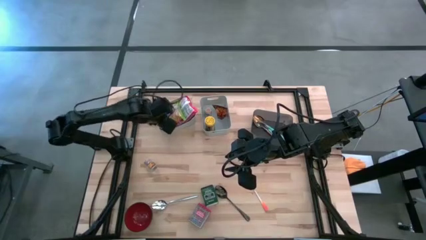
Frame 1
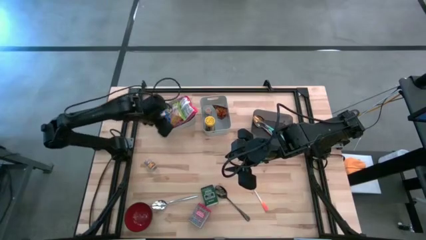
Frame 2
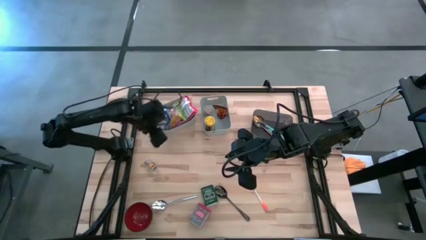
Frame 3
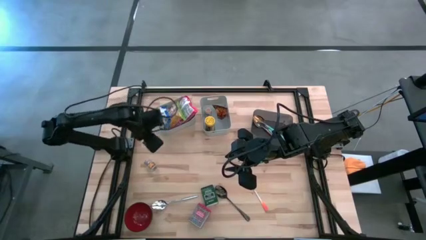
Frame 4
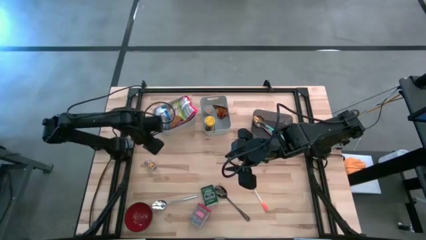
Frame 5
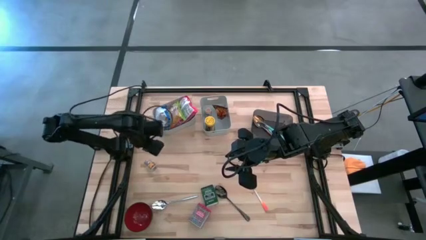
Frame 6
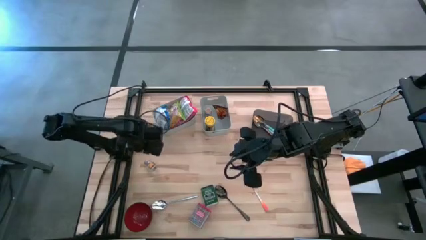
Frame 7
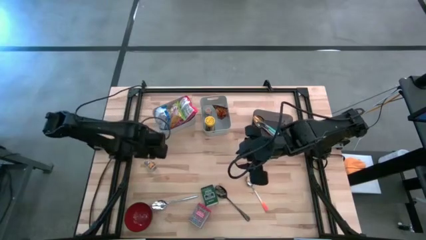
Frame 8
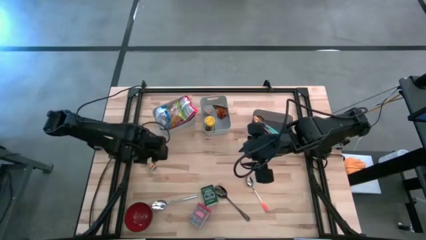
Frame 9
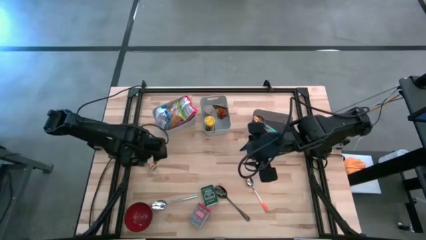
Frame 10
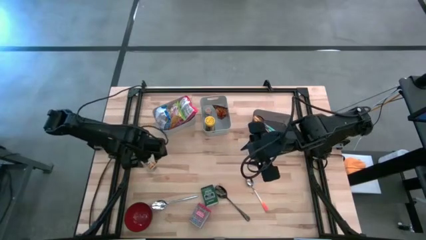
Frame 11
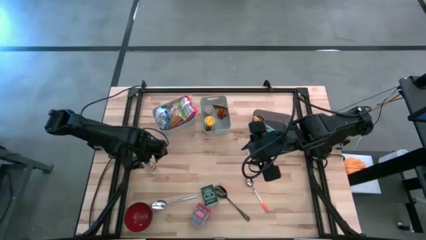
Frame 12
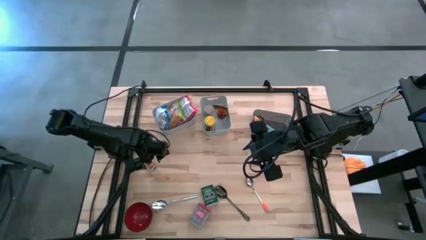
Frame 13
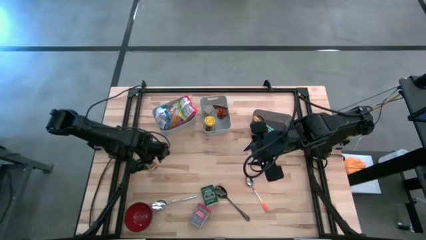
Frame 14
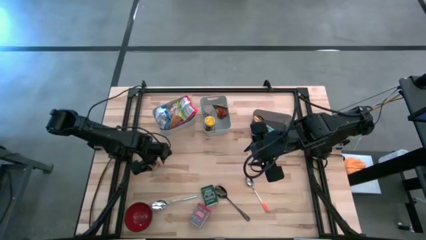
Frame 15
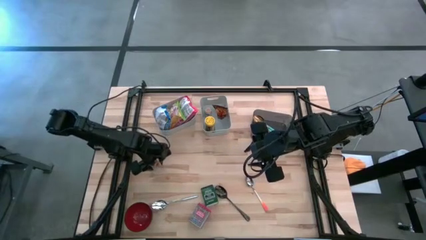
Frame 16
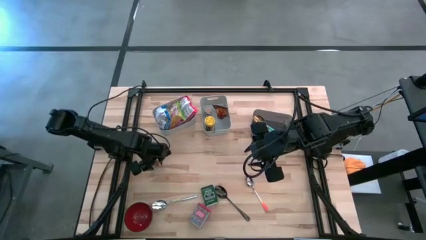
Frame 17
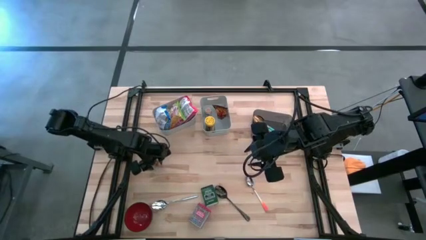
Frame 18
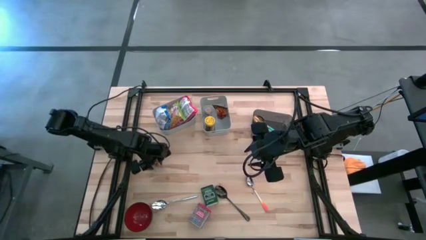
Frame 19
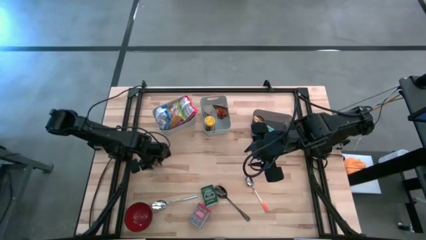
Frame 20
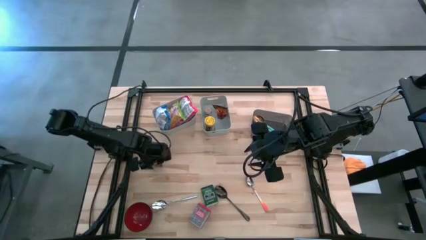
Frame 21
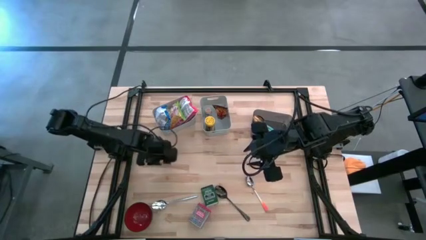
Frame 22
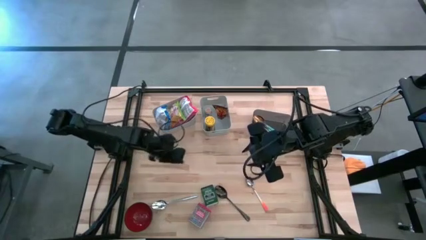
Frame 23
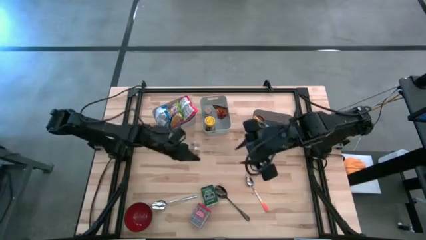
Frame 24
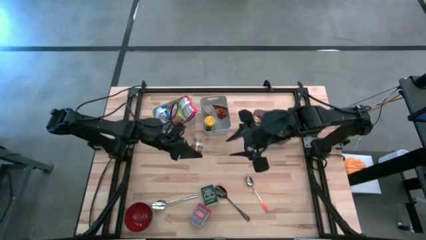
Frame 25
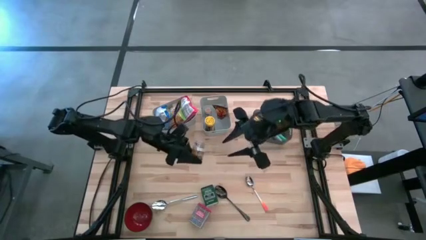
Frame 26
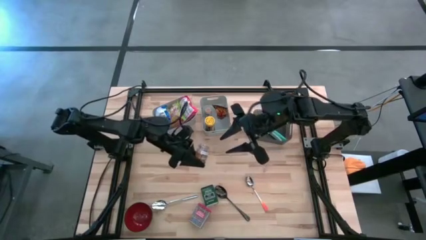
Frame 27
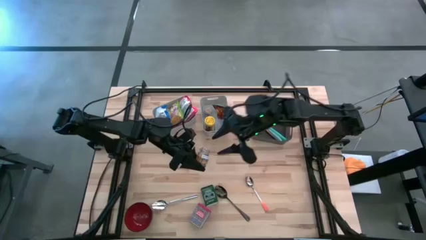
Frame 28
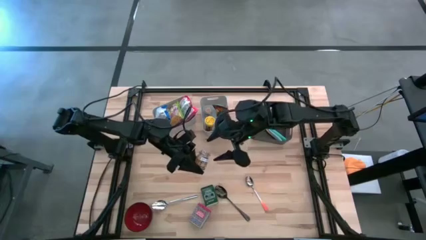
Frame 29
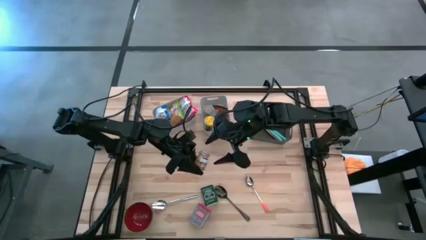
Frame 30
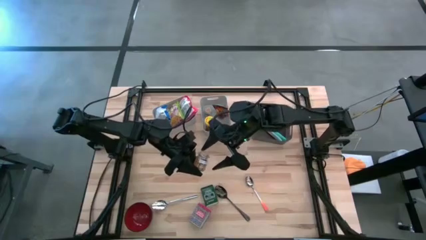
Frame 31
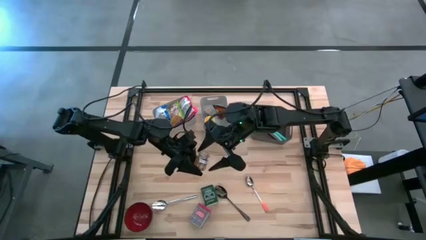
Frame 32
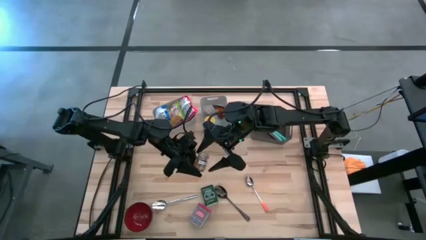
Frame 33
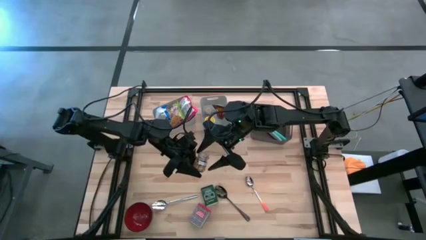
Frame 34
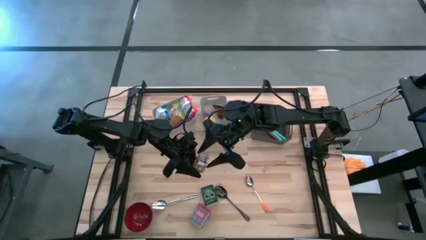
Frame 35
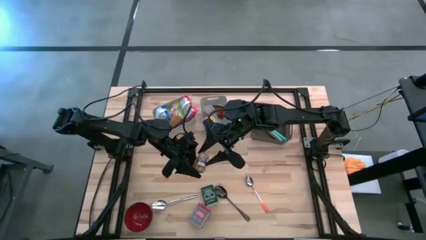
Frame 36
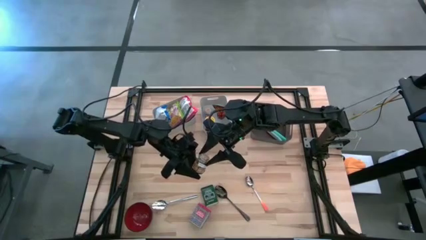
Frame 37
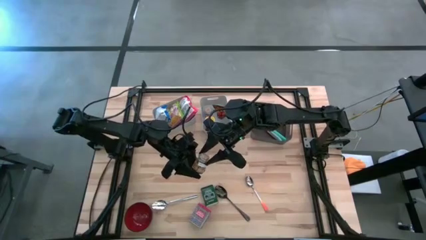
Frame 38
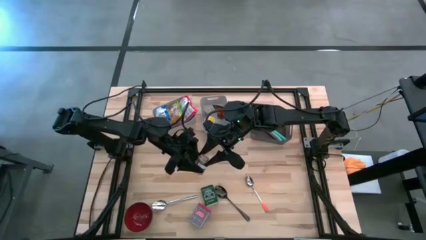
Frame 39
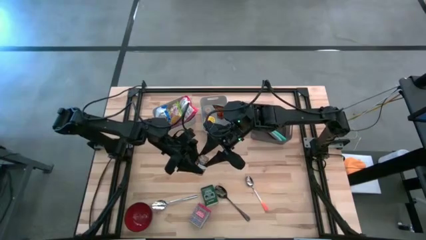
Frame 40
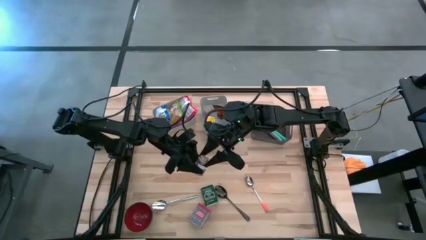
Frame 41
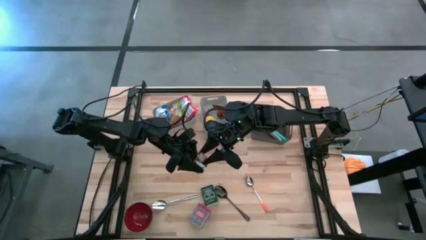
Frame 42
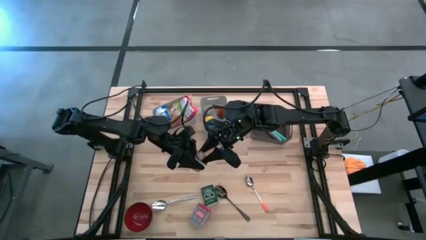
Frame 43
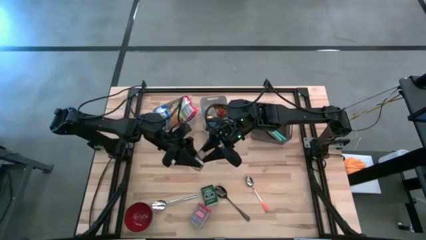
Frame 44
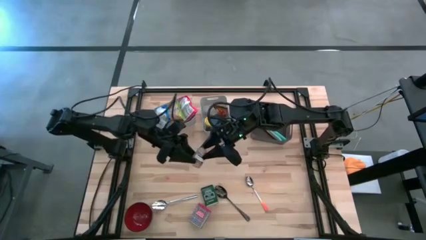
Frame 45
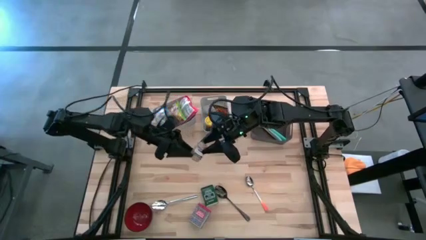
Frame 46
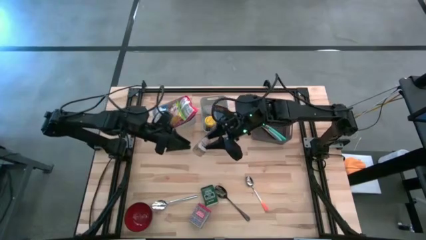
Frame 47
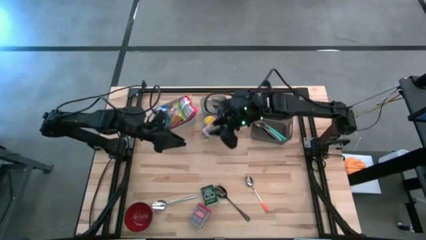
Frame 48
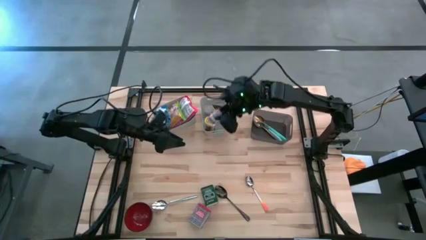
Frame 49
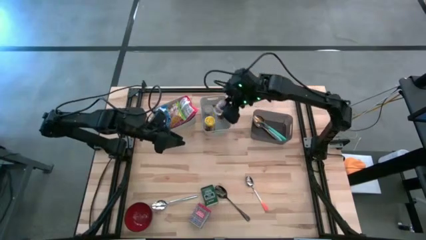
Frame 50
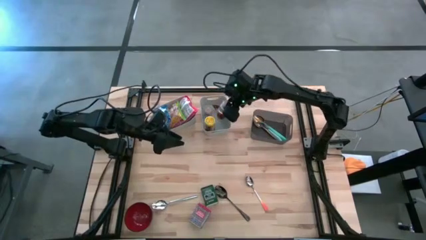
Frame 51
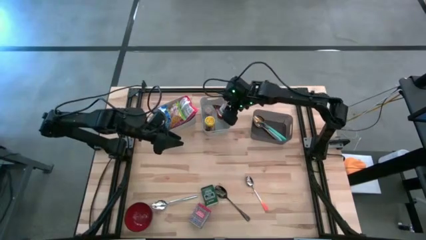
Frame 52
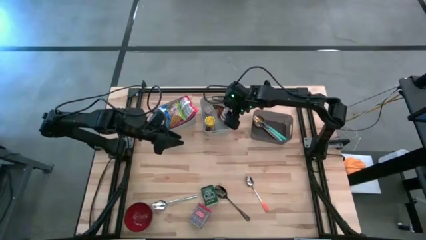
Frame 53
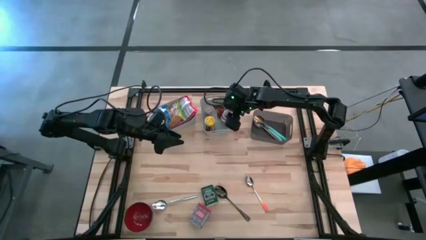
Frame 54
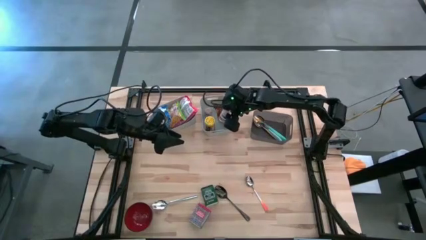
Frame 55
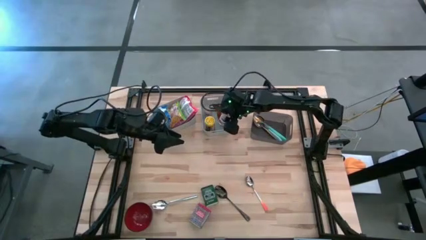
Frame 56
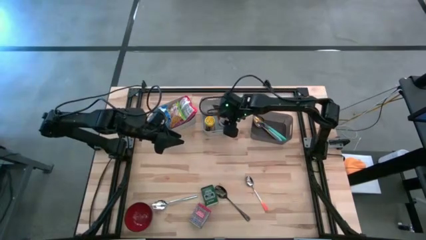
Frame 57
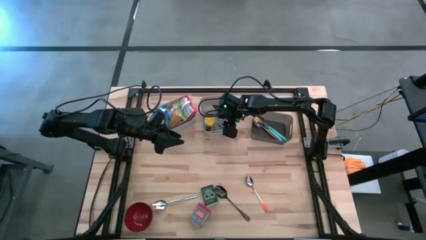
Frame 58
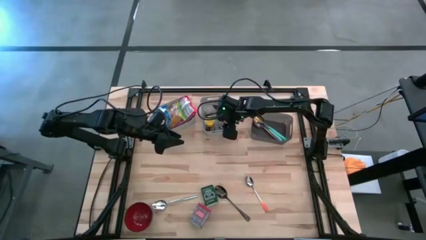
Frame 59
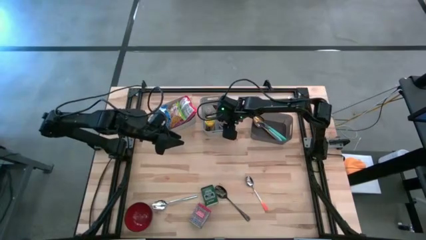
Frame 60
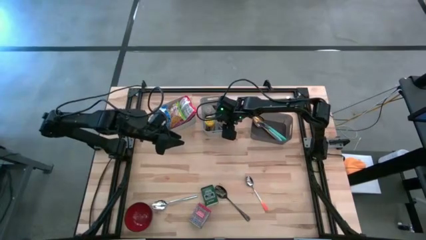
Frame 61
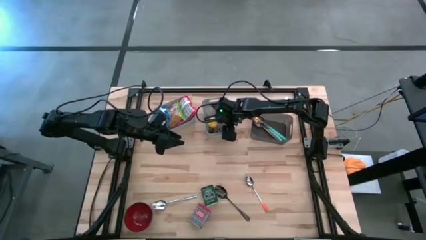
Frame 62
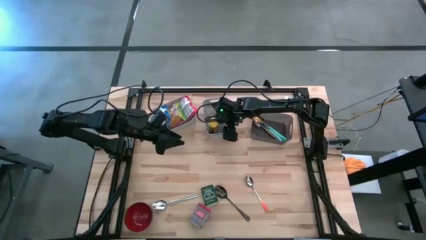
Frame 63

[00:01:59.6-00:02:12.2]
Put the brown seasoning bottle into the right gray bin
